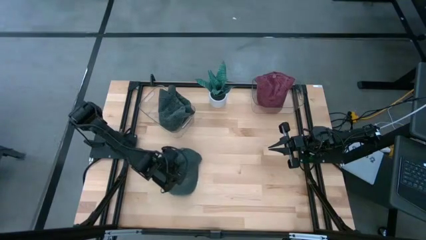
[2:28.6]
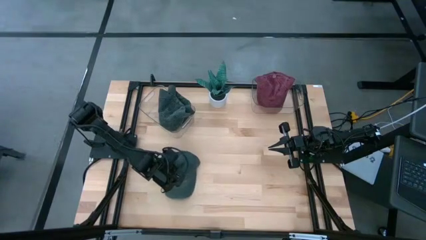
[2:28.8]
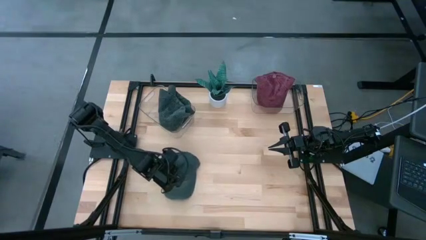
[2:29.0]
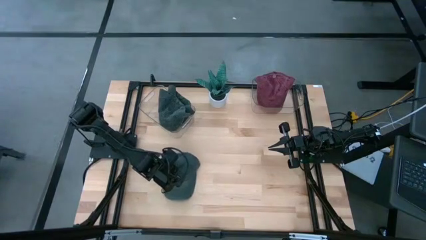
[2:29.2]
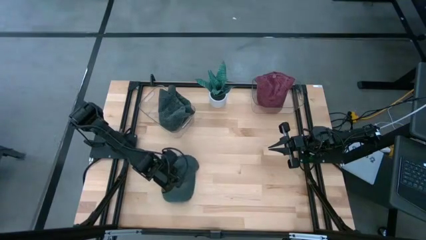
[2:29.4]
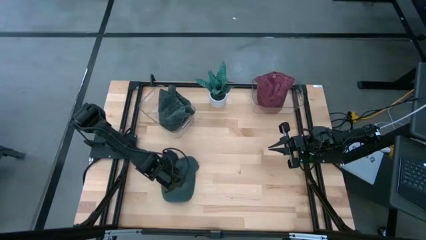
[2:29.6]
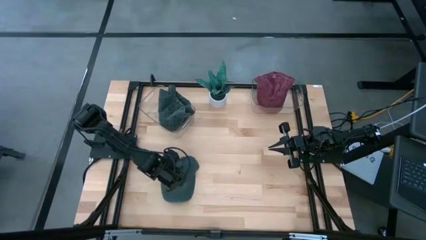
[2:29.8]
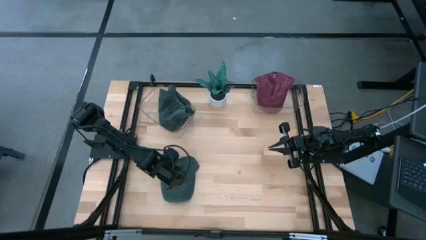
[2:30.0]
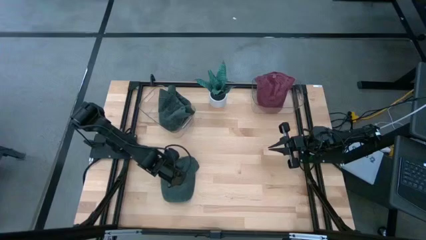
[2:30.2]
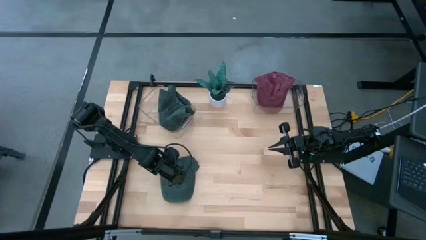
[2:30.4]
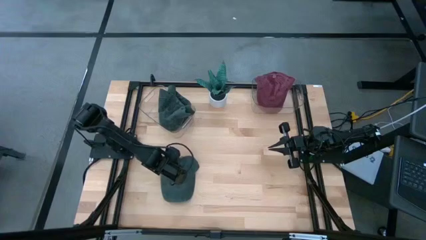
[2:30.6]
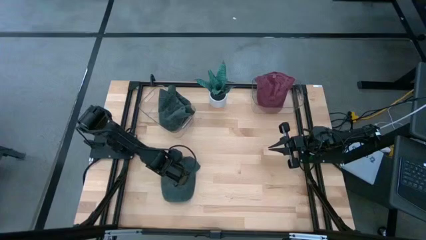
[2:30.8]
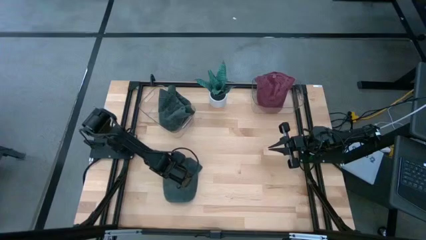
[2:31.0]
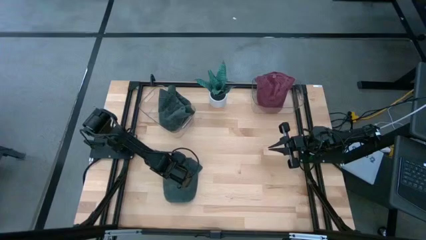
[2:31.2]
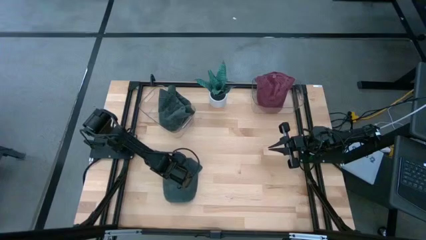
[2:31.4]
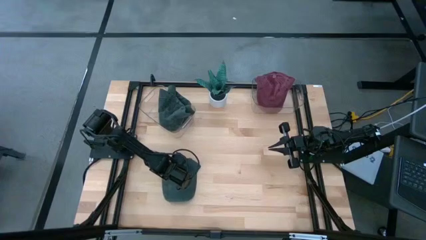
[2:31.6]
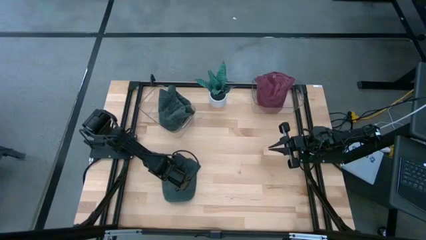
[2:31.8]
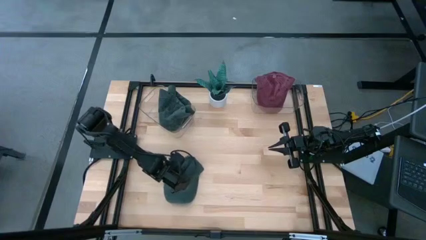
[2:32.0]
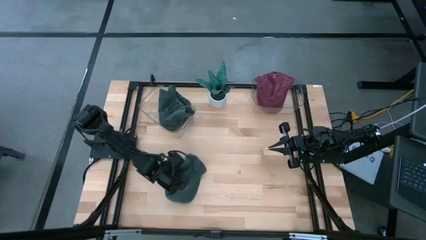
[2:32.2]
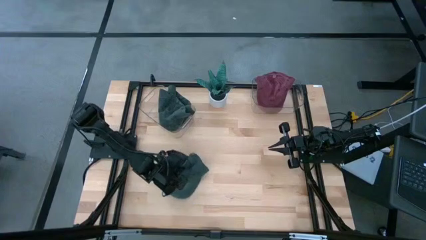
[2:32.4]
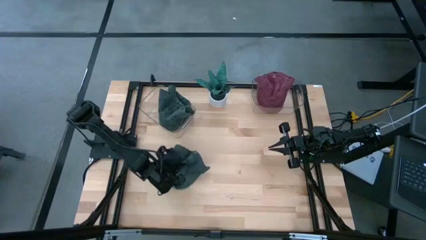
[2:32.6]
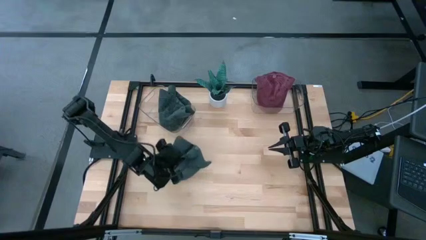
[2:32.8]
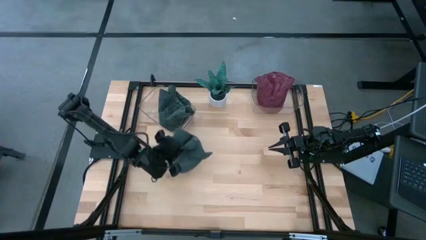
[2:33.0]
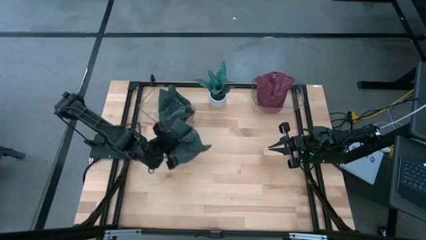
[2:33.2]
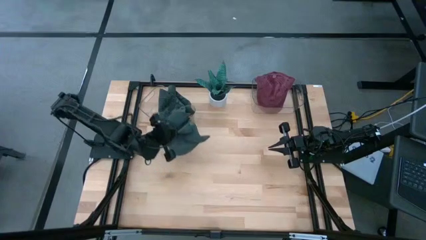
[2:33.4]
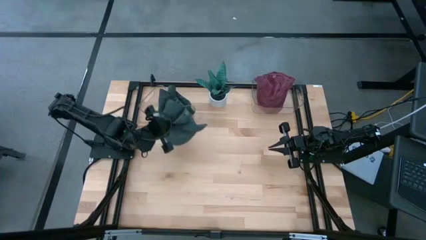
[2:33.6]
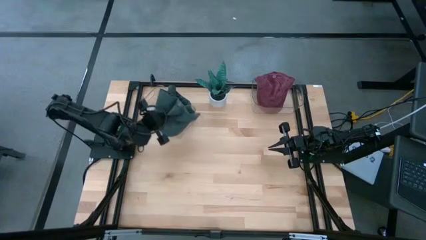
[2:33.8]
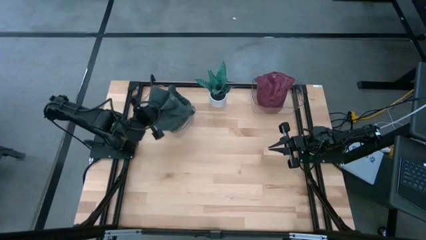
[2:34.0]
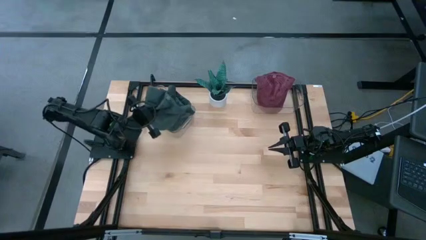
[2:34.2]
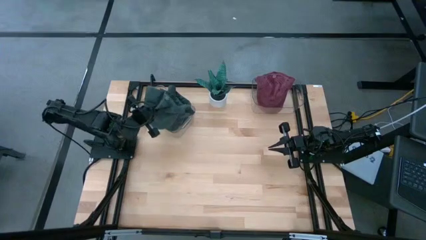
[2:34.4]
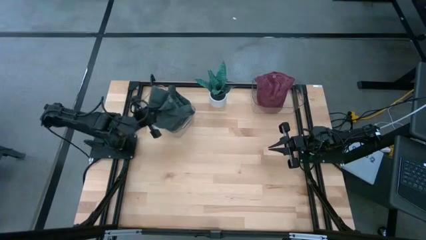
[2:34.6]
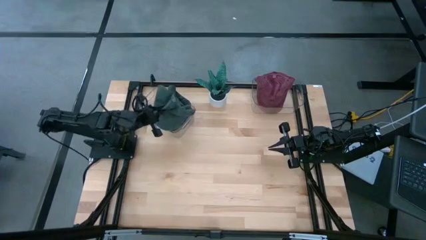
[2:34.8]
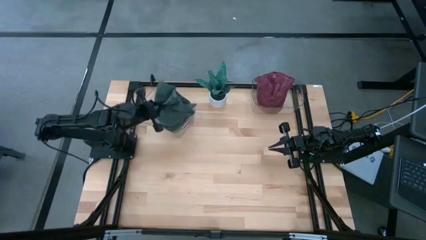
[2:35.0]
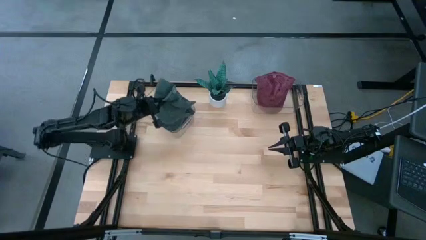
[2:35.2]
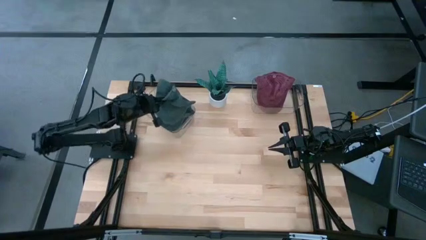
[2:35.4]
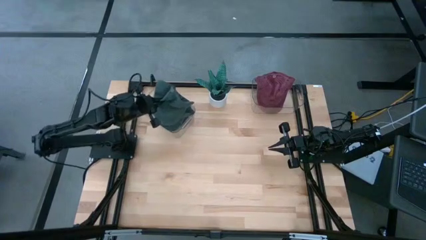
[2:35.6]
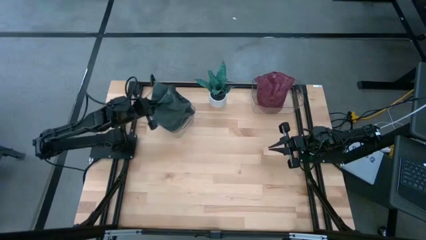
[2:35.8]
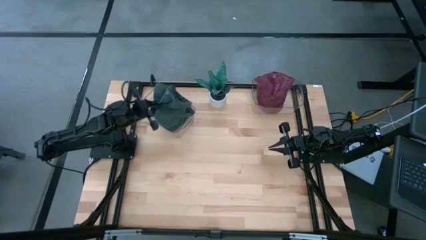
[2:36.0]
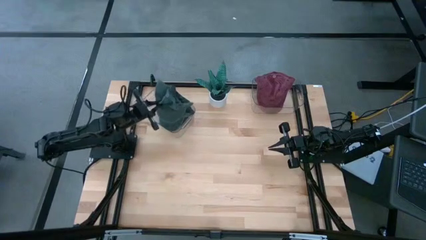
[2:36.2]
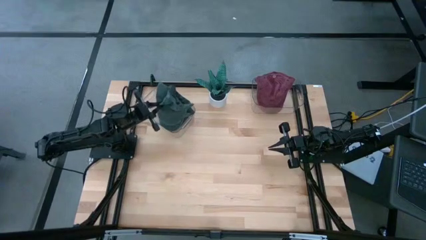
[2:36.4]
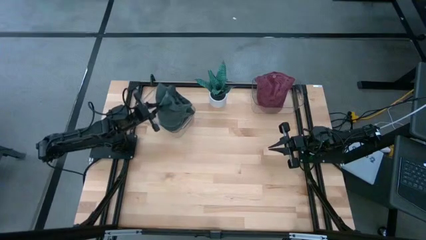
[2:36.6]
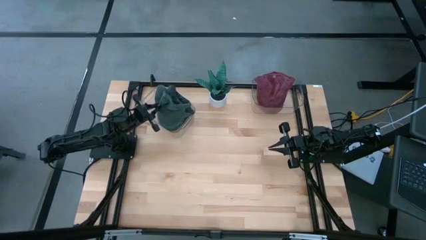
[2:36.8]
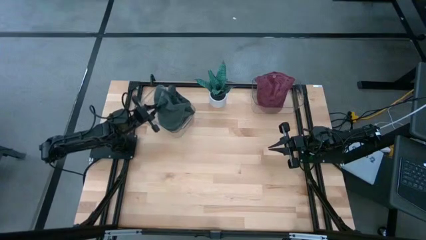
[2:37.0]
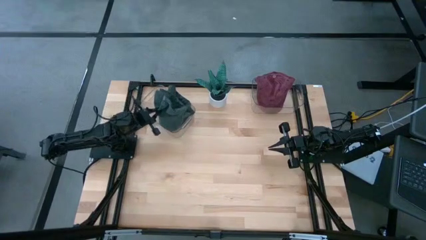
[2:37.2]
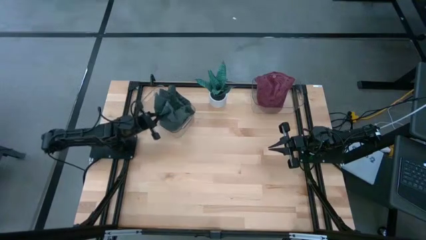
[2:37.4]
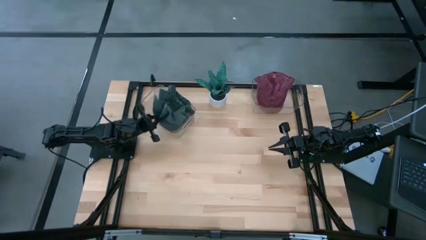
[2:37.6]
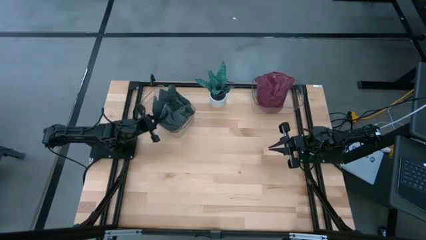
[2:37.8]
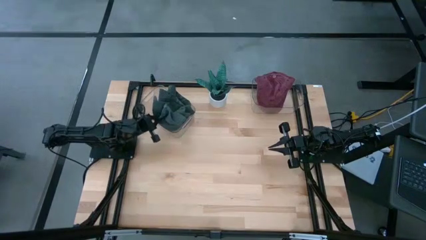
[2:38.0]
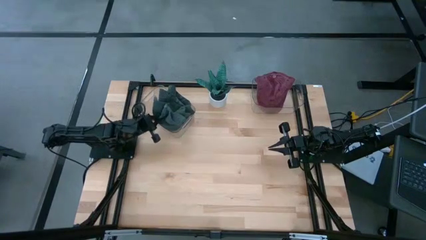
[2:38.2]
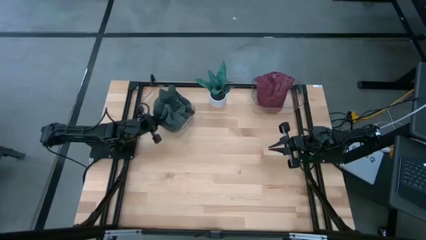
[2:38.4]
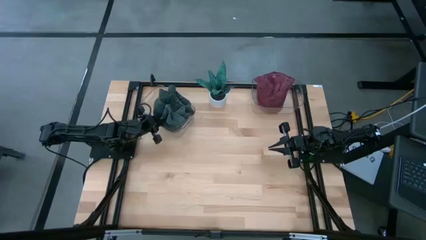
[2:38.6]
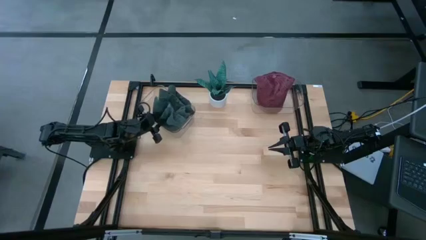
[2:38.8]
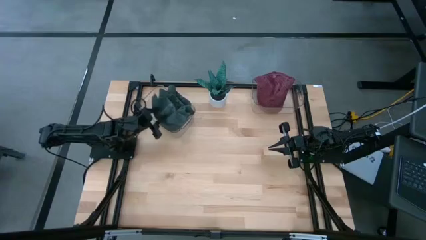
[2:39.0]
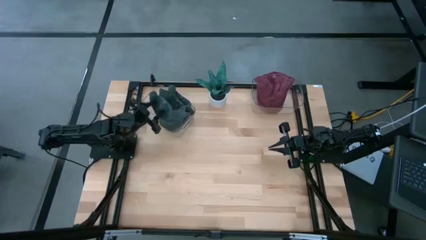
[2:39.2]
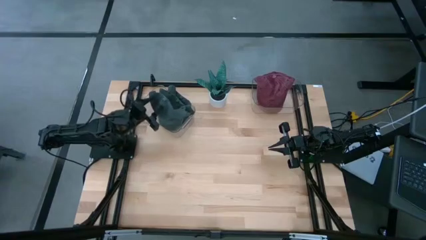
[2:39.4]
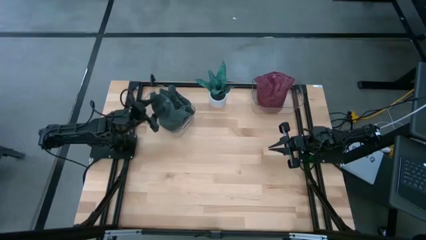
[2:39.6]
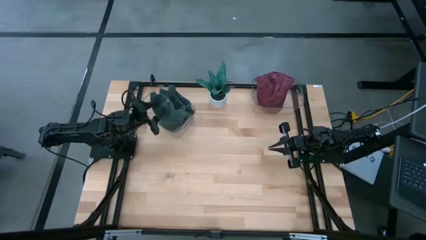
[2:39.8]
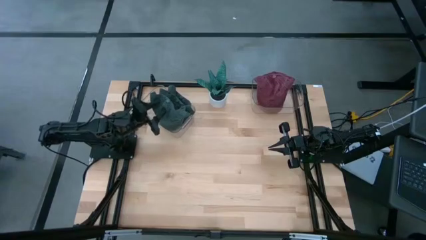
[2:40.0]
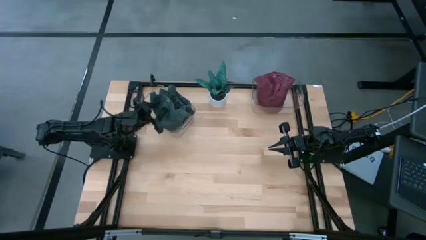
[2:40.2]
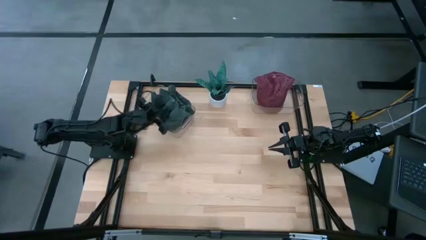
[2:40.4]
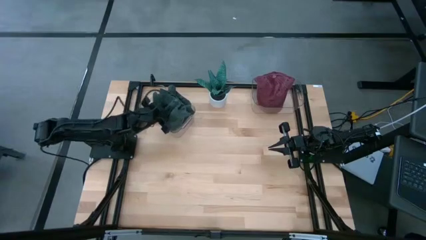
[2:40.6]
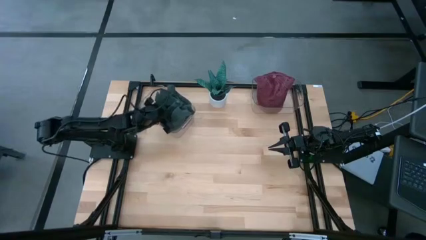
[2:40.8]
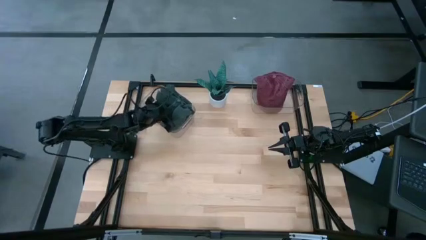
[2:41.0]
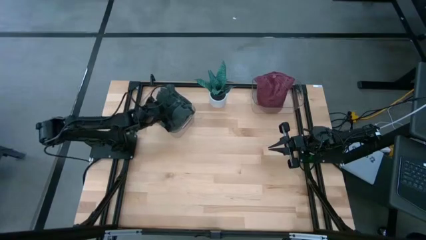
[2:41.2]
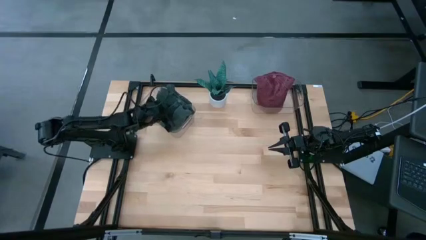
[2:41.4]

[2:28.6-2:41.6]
Task: Pick & Place hat
Put the black cap into the left transparent bin

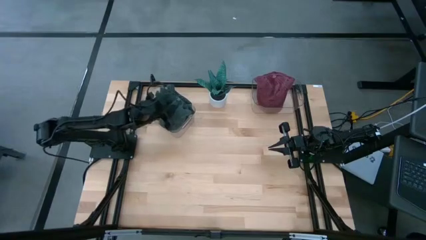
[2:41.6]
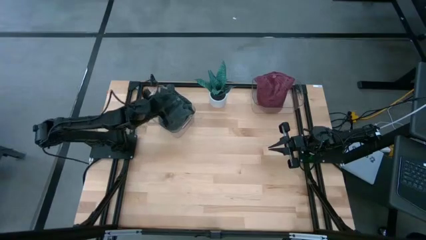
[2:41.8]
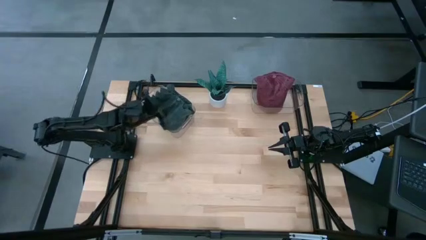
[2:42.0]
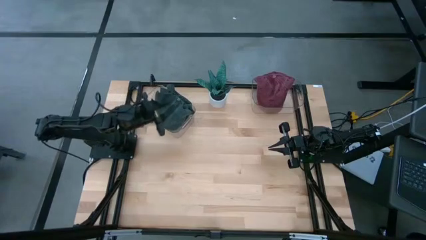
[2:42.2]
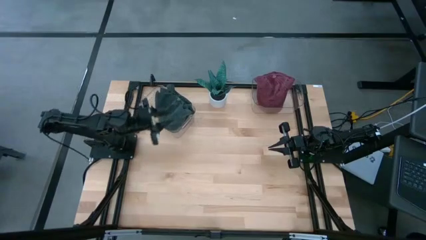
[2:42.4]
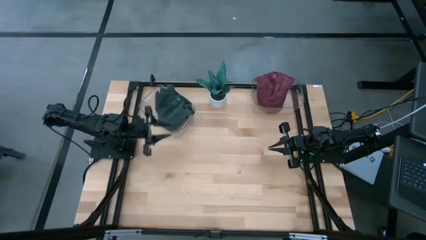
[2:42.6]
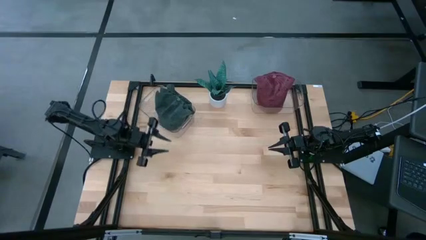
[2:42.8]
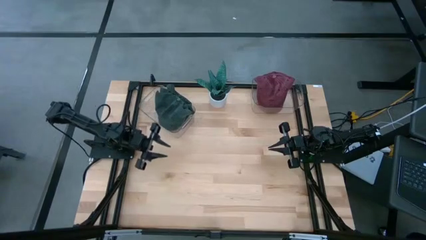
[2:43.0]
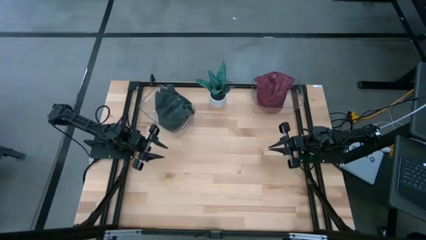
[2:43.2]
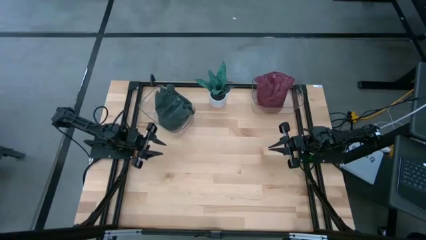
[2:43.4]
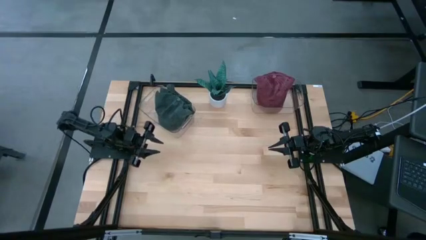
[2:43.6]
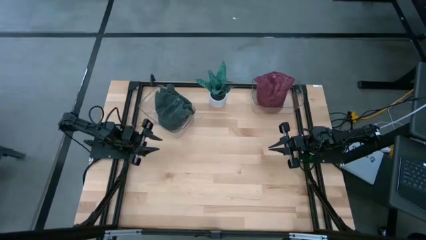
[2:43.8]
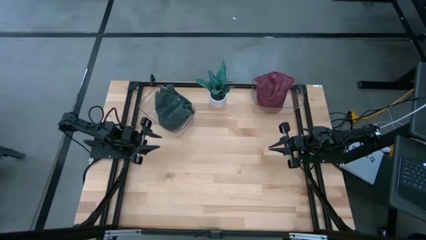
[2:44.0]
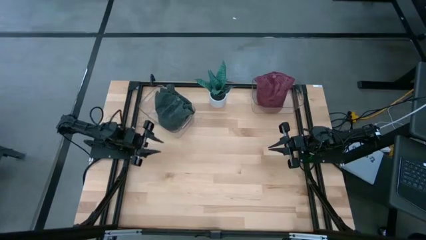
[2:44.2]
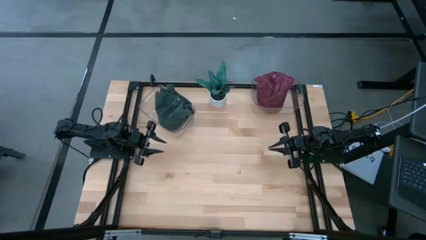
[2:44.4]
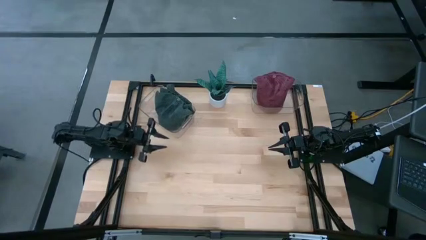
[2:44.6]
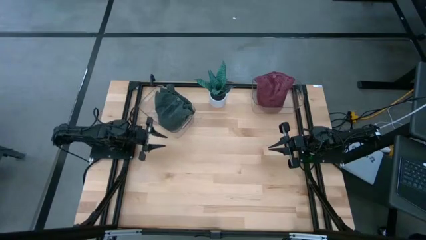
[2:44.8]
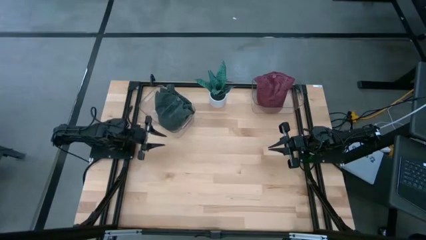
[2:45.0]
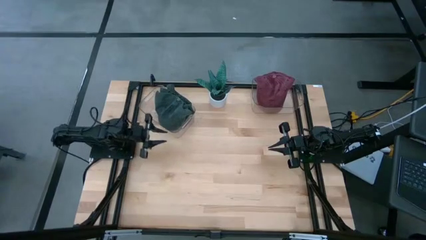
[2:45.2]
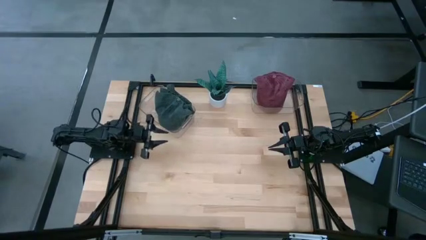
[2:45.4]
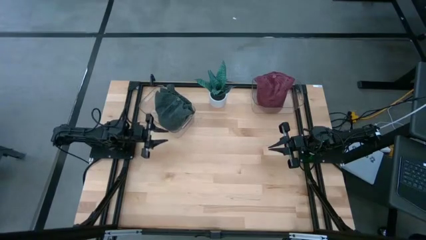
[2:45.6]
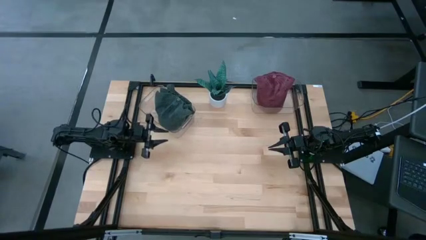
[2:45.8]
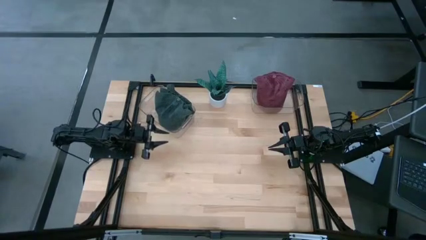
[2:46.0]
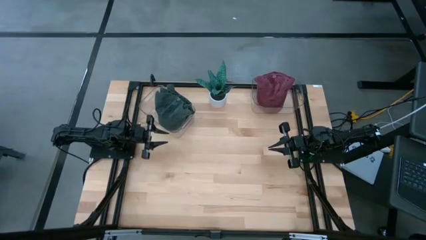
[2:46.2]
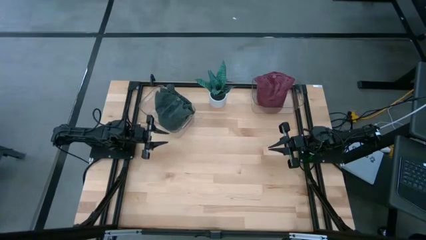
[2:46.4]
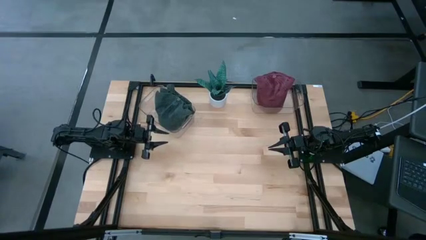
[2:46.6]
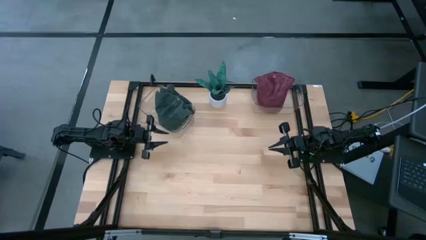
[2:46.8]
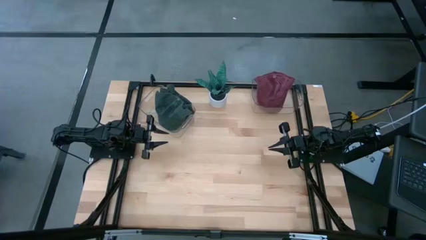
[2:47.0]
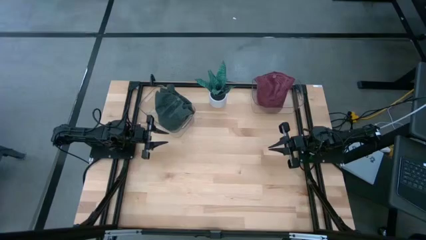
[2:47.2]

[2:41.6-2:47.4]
Return to Home Position
